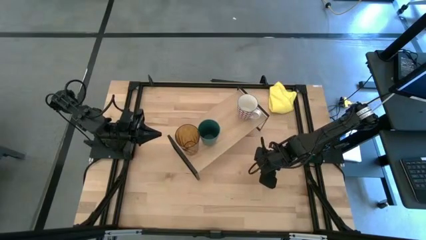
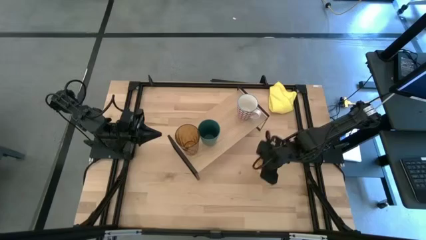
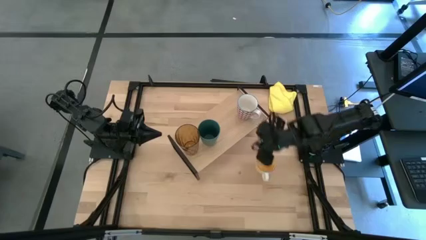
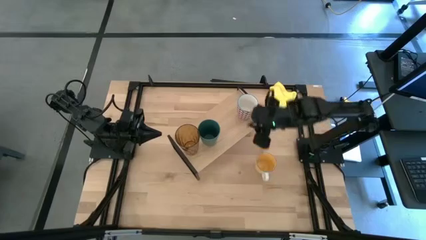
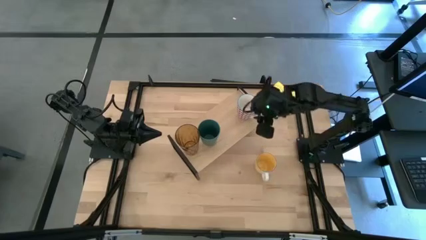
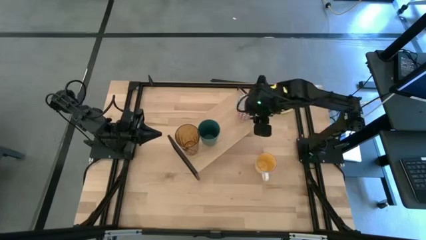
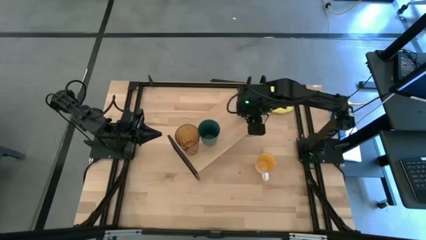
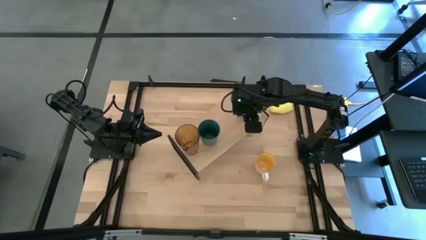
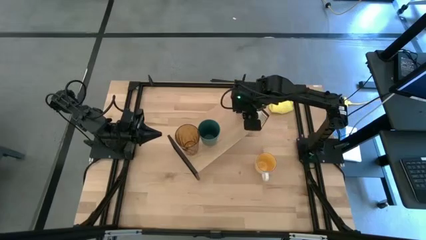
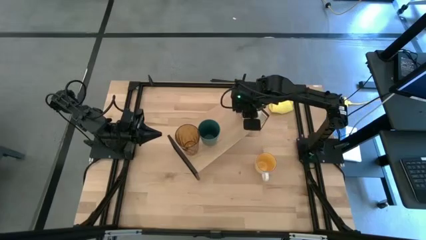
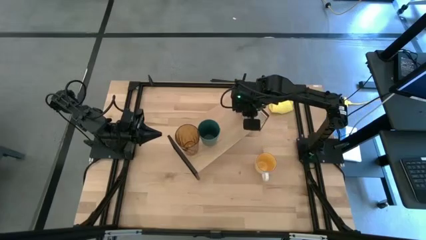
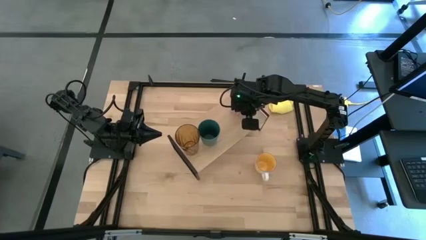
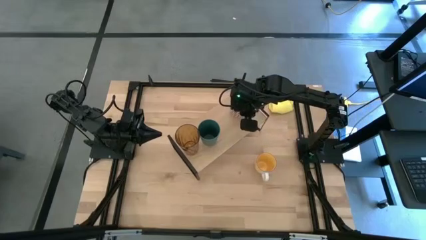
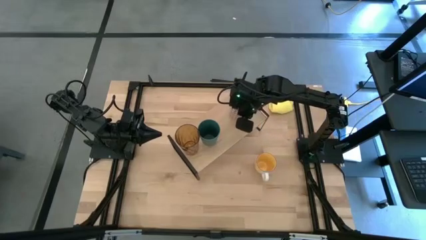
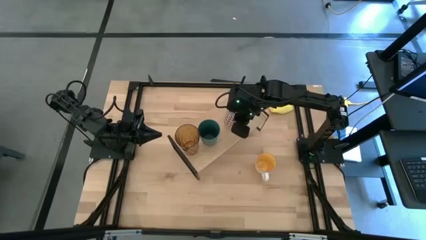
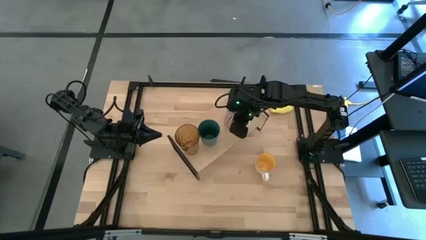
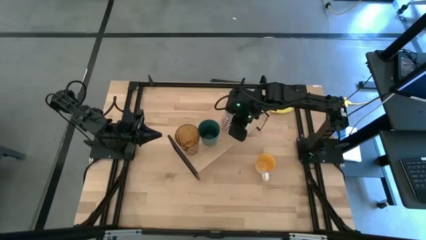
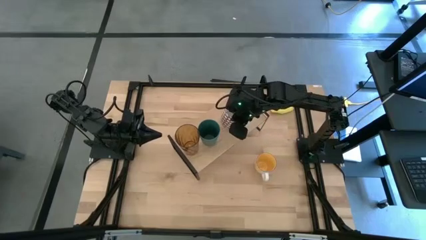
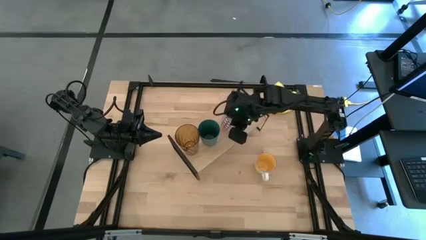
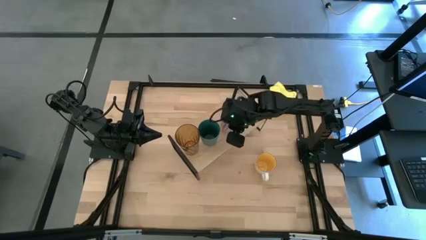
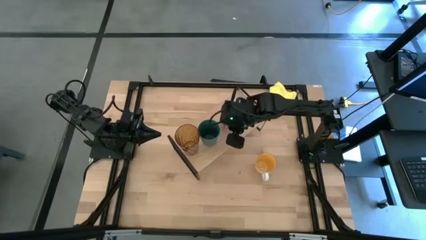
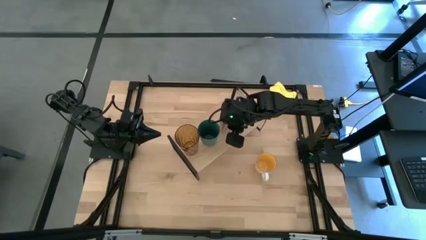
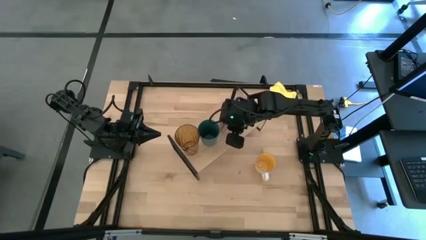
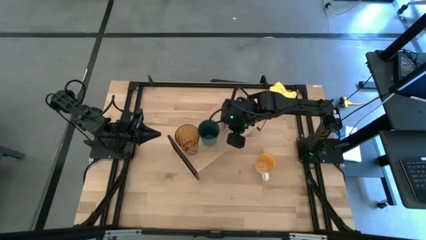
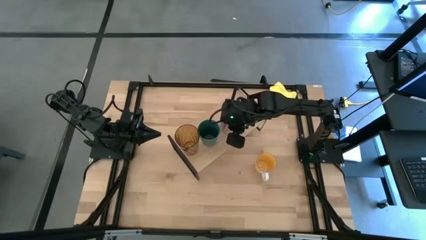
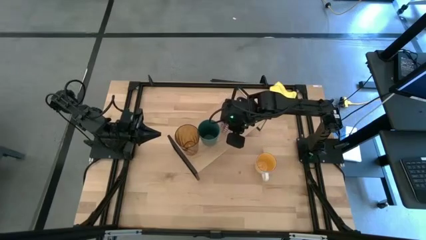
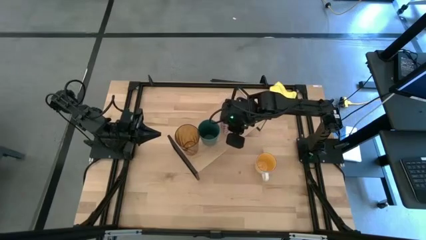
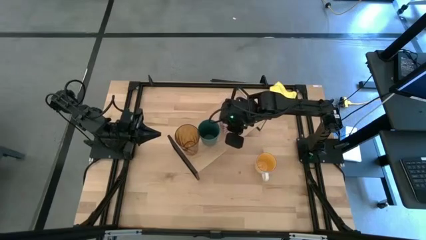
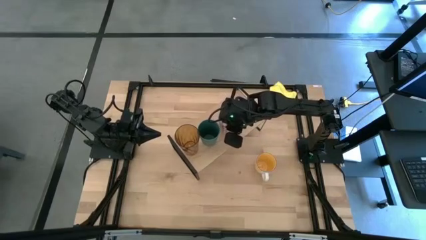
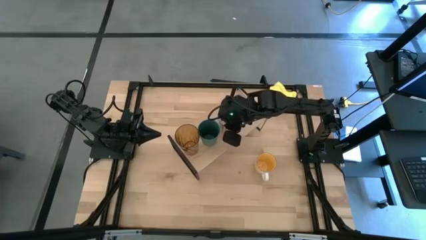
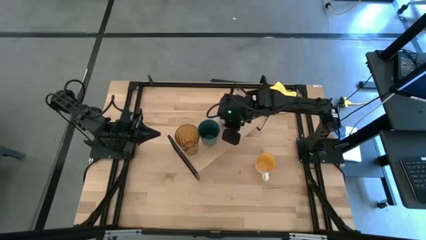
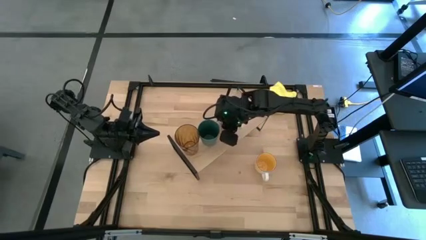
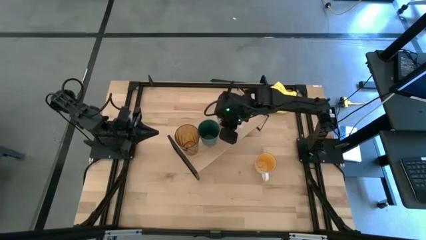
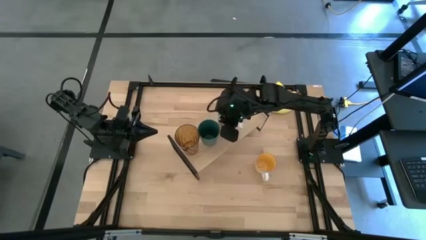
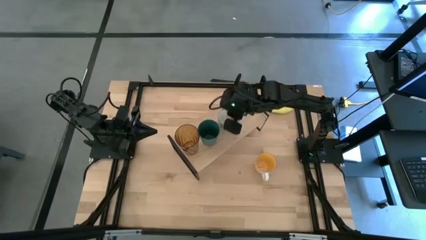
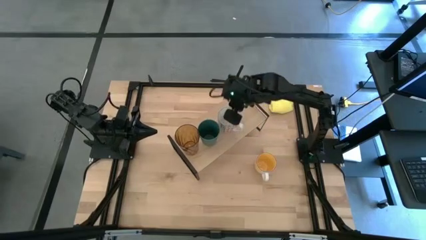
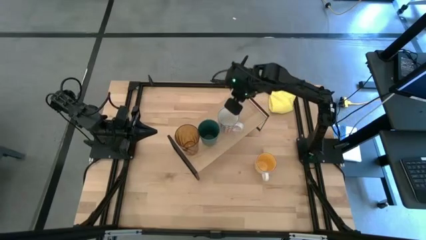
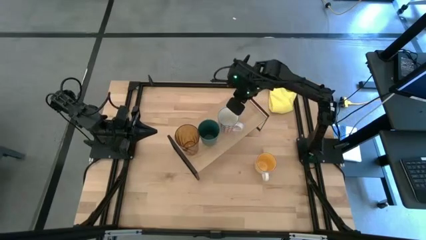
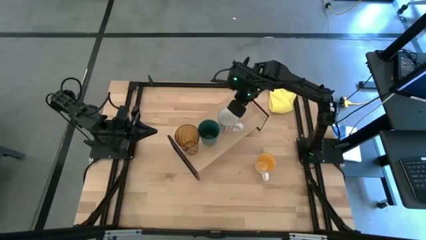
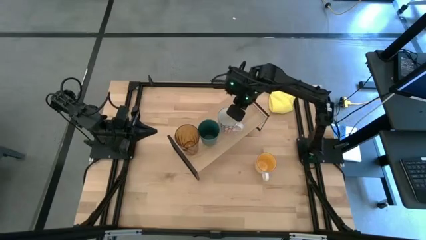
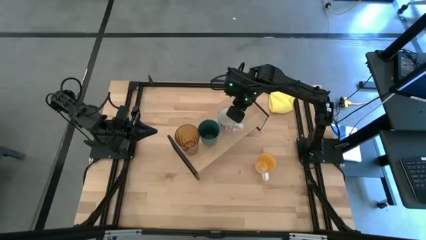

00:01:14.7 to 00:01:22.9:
Task: Stack small to large cups/mugs on shelf
Adjust the red patterned mug on the shelf

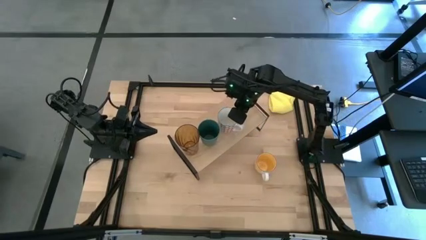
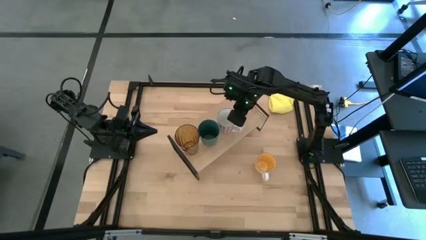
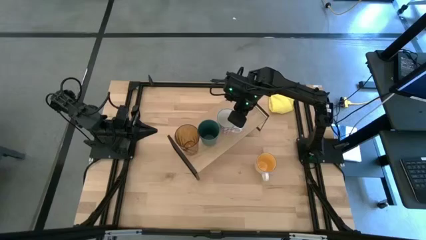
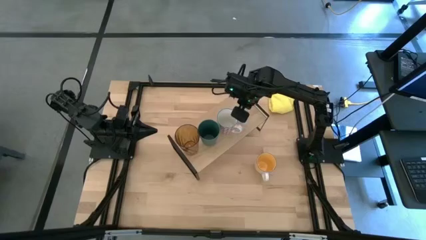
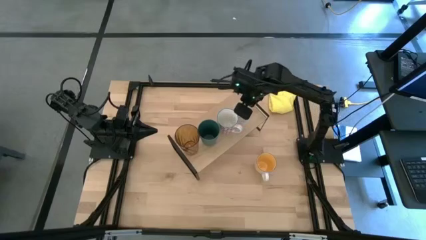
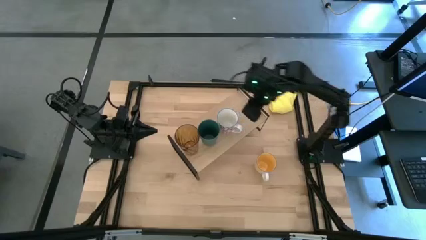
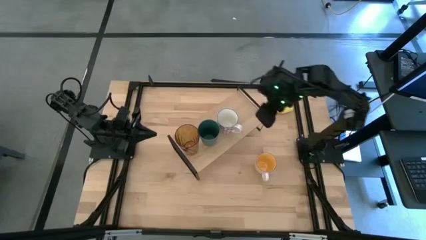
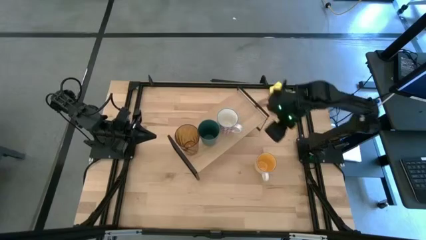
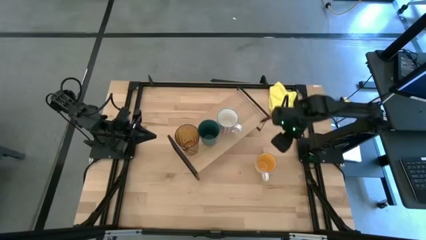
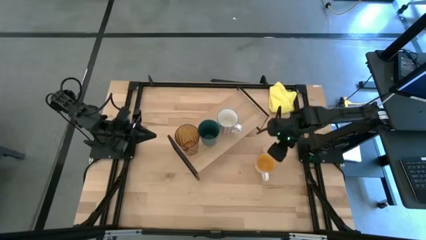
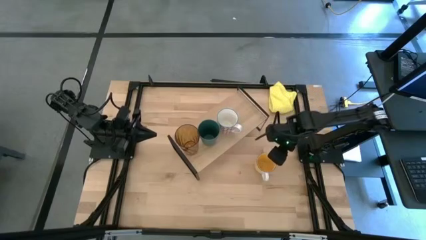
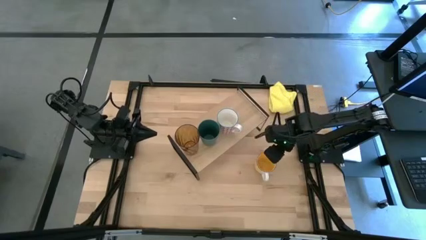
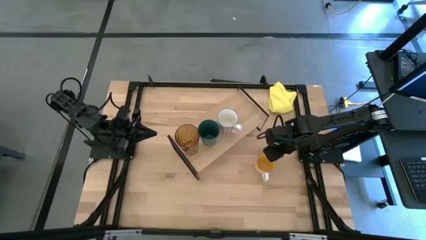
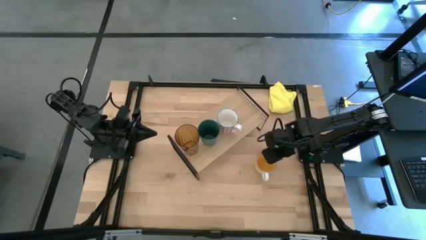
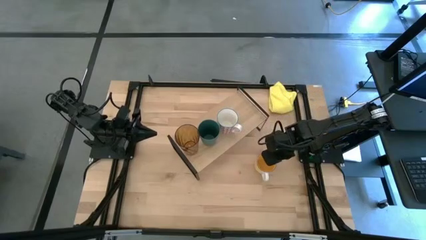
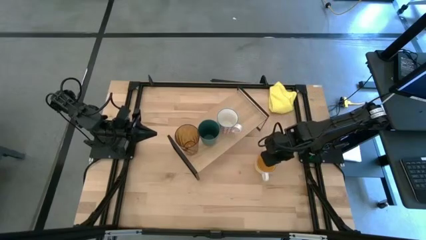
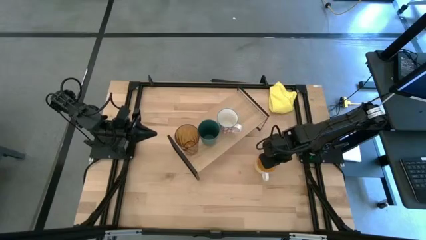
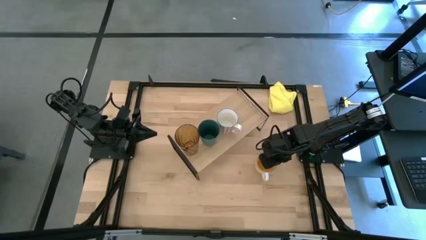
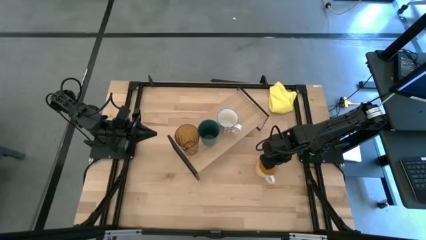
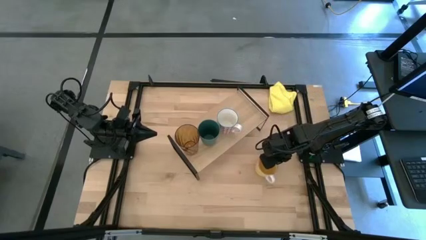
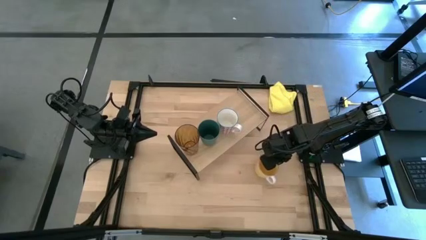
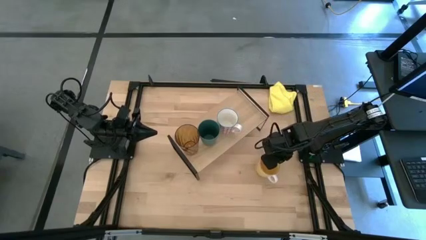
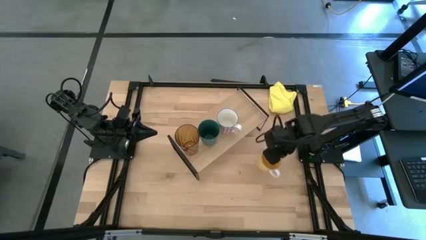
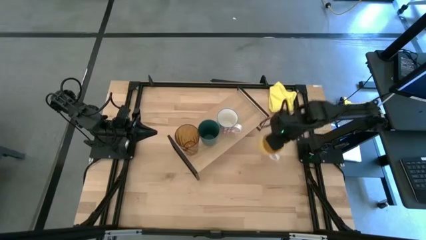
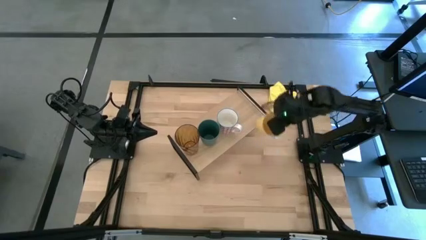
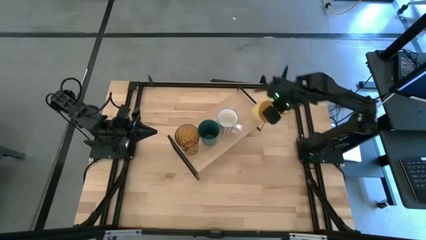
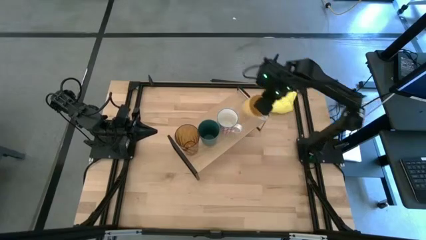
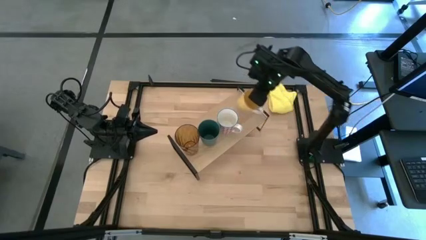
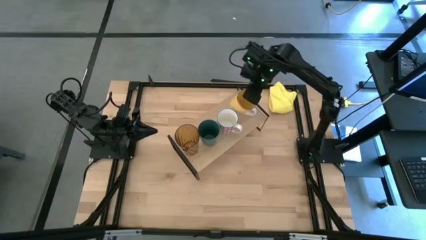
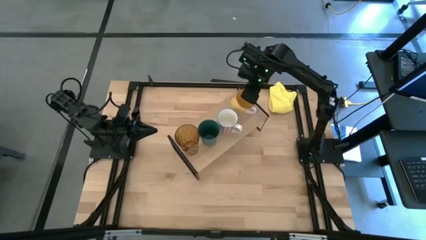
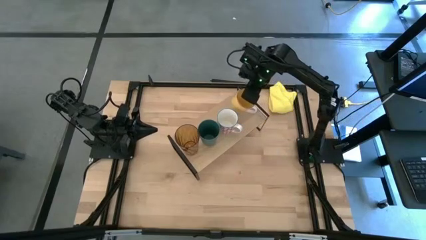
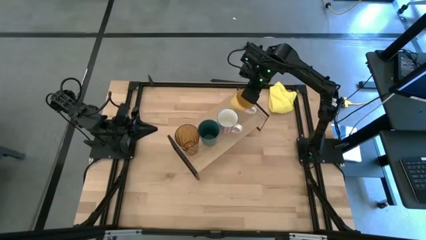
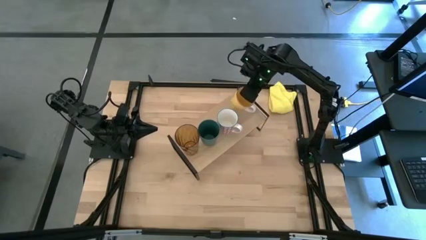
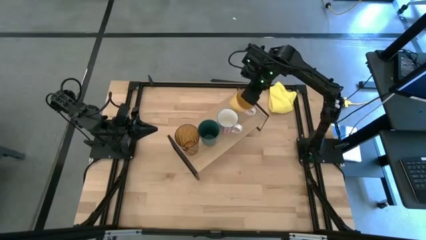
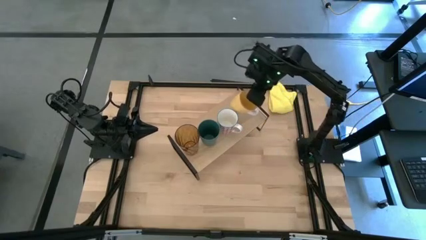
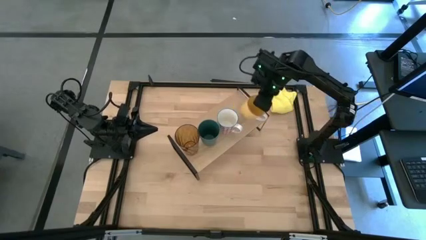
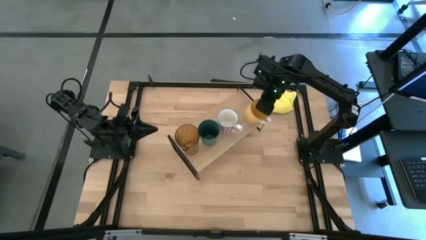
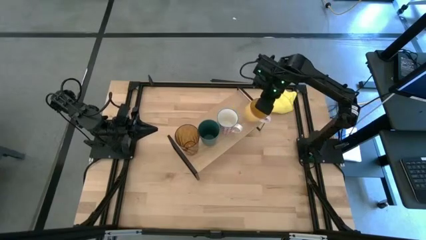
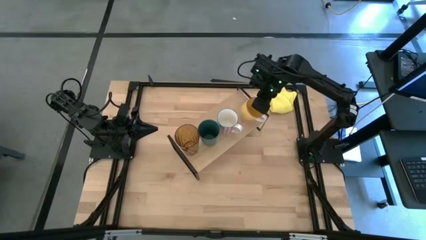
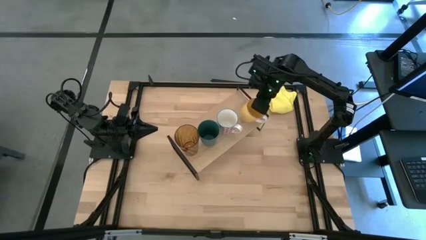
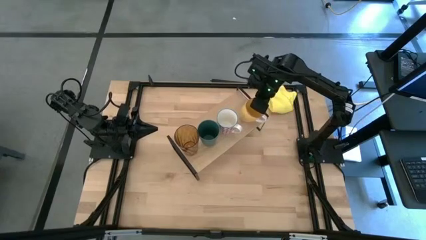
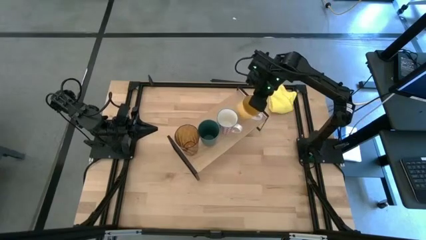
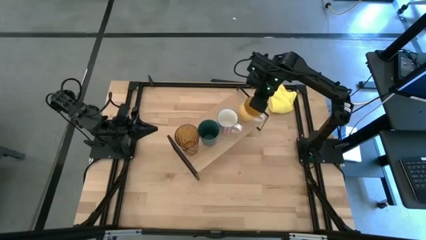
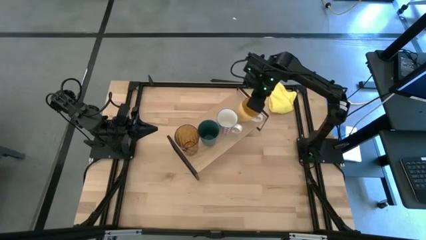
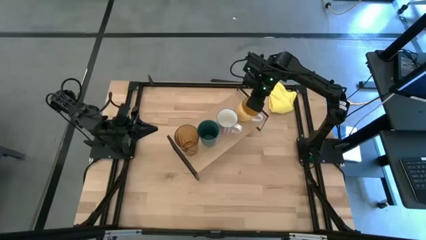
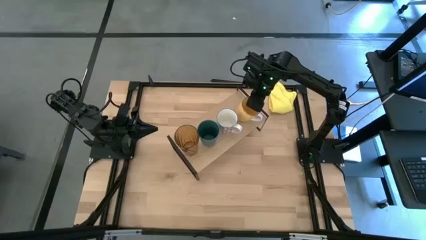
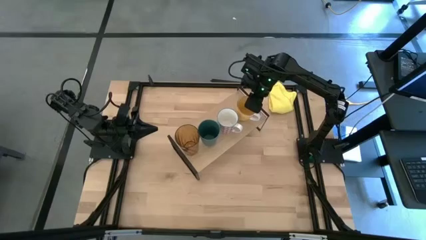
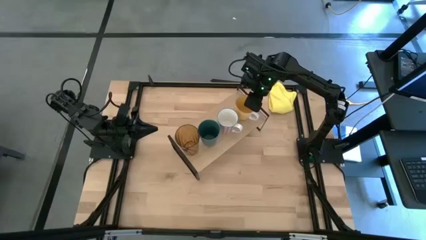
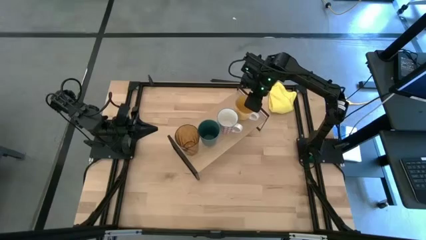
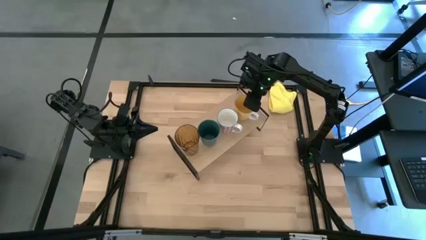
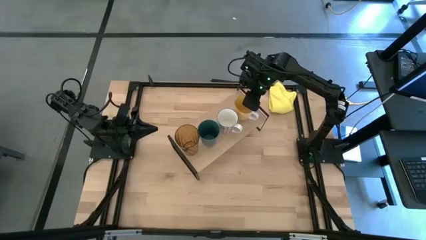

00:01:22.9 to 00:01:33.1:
Put the yellow mug on the shelf
